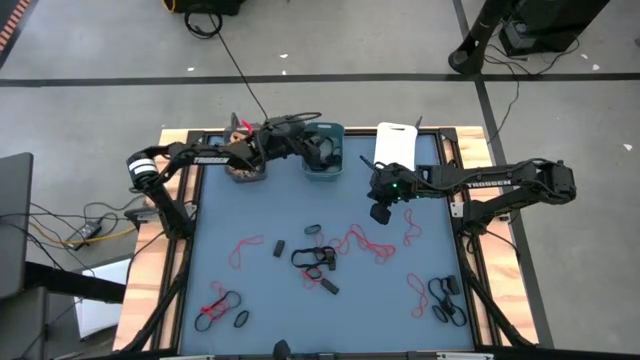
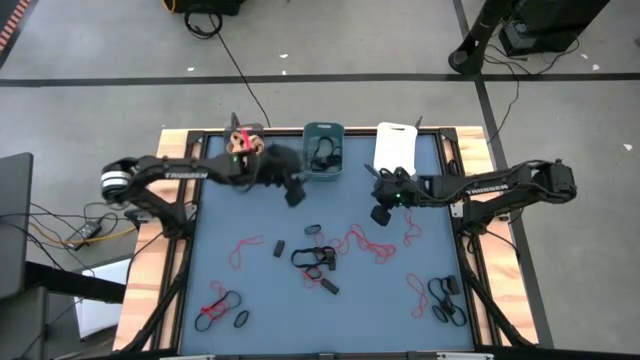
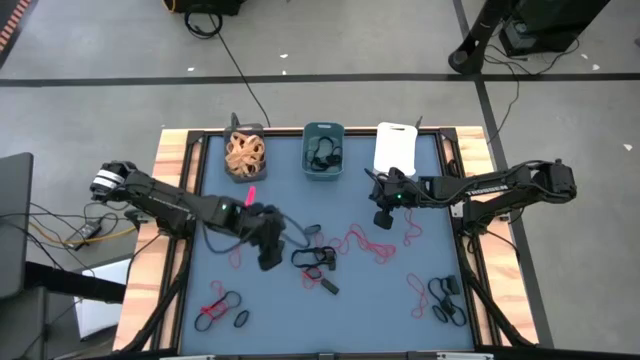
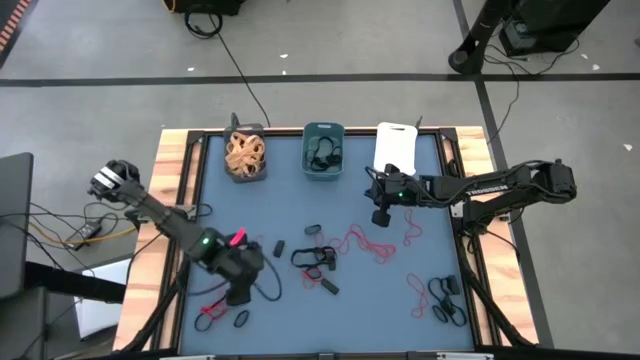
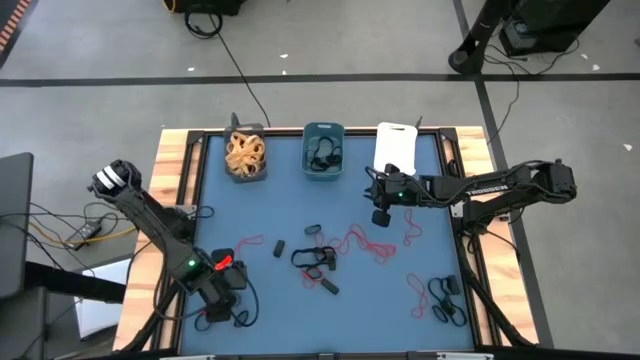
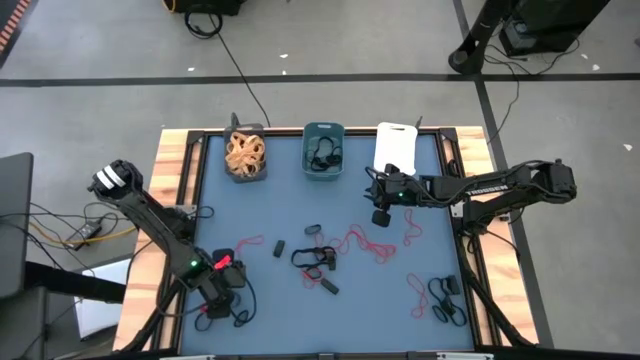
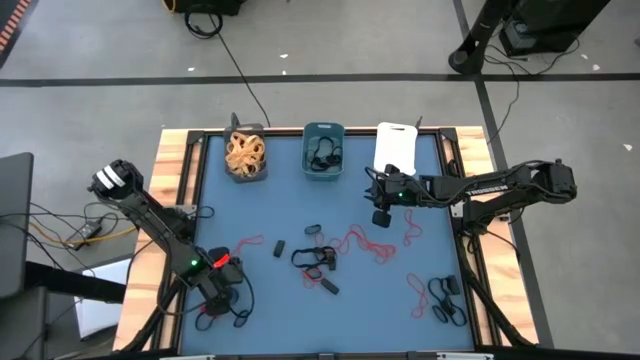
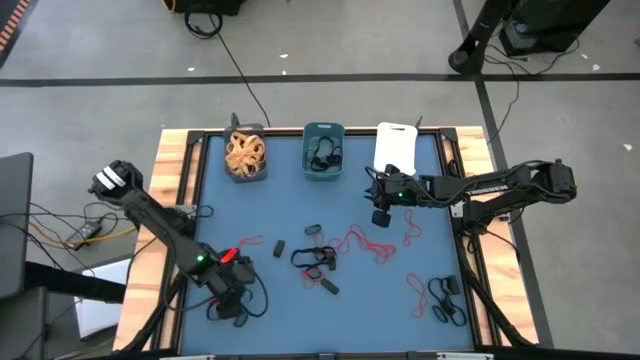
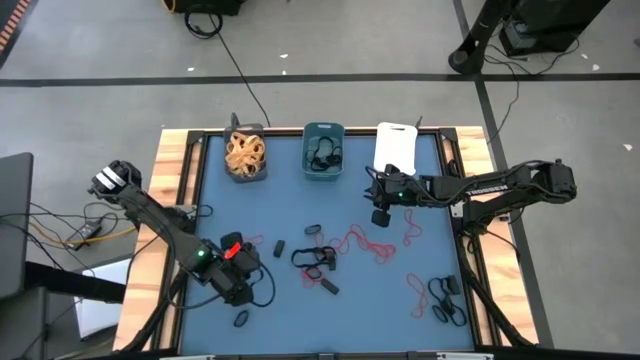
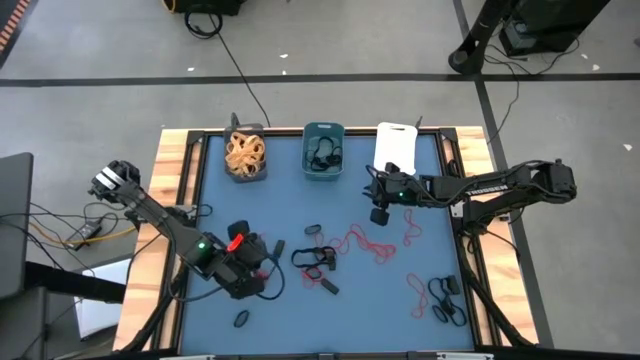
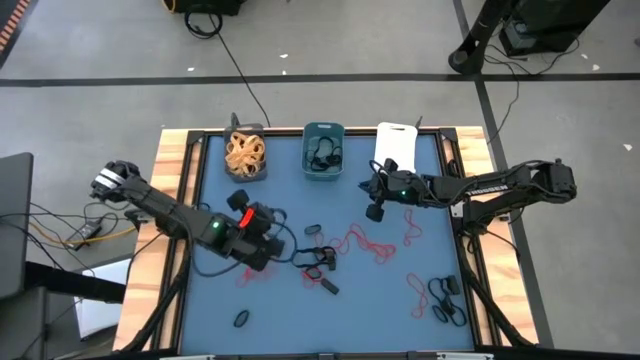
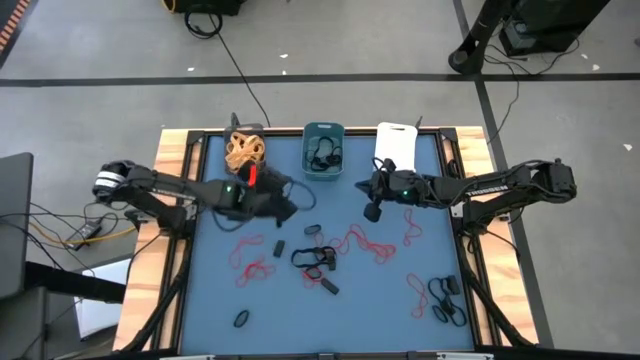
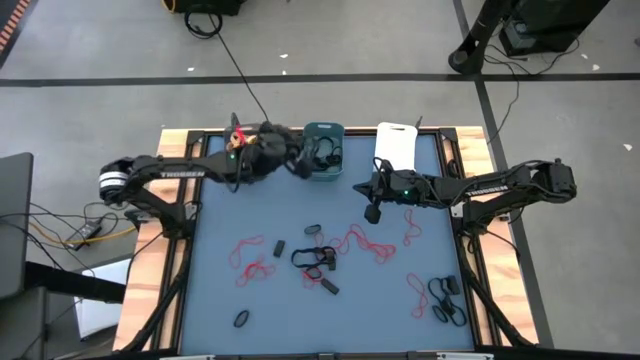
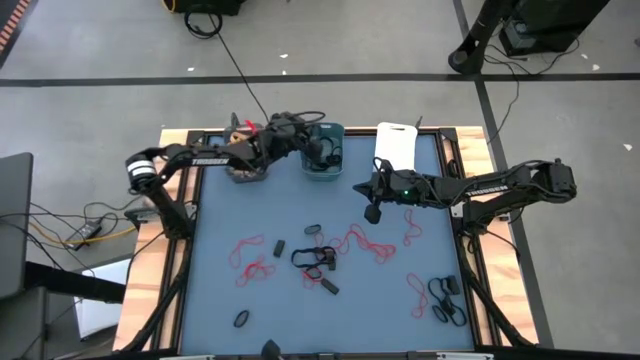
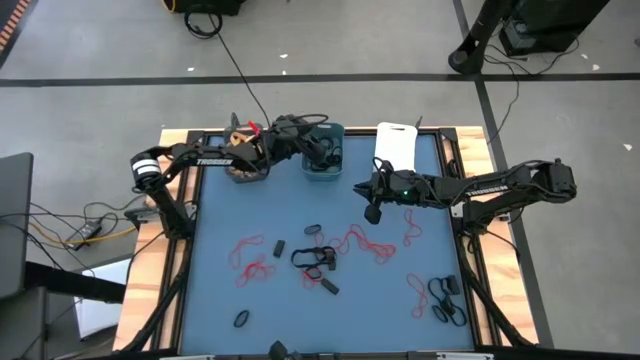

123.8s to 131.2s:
Task: Sort rubber bands into baskets
Put the black rubber band into the blue bin

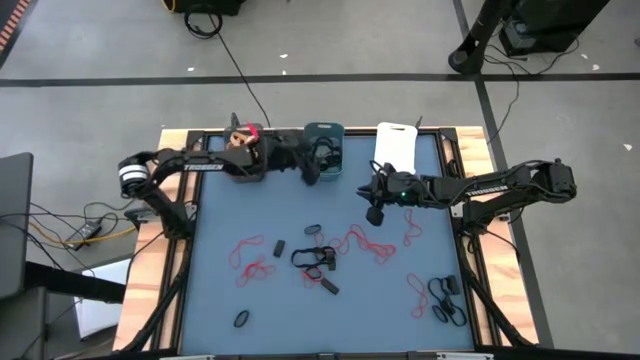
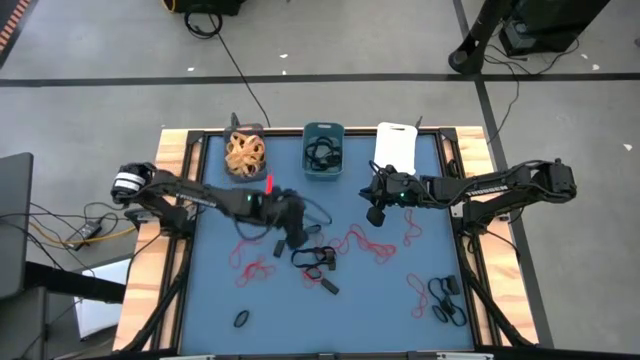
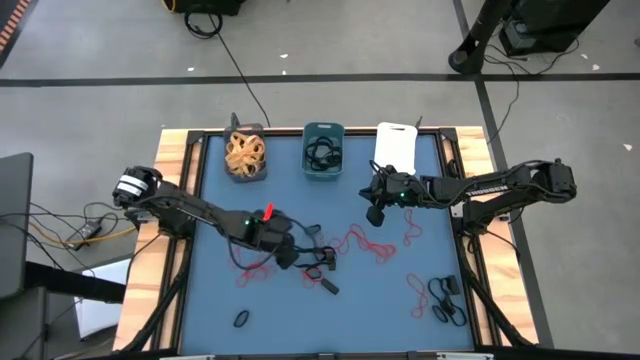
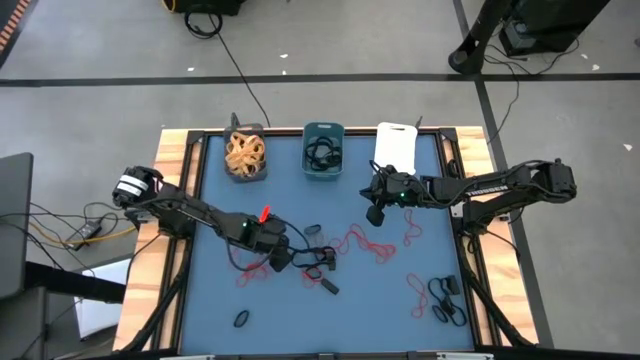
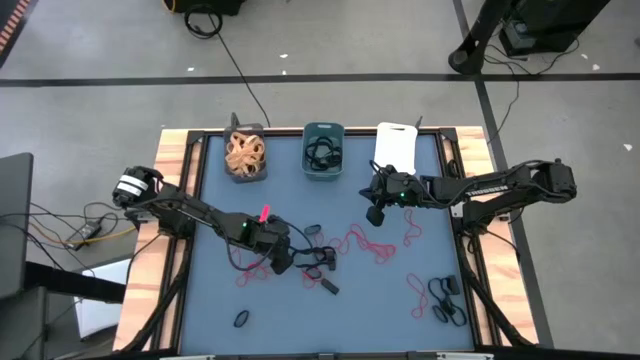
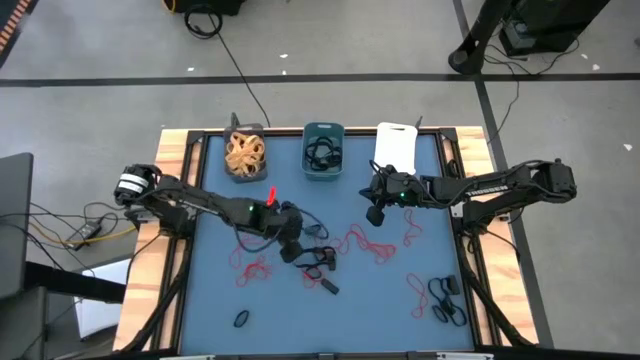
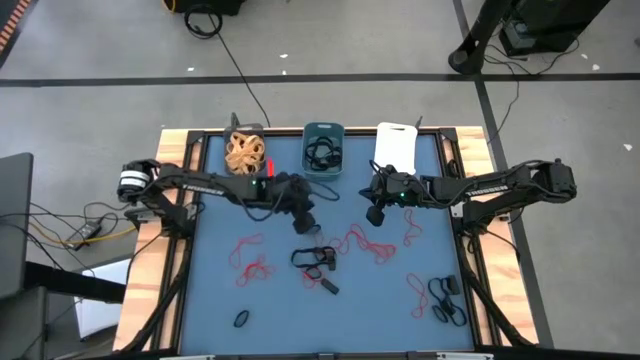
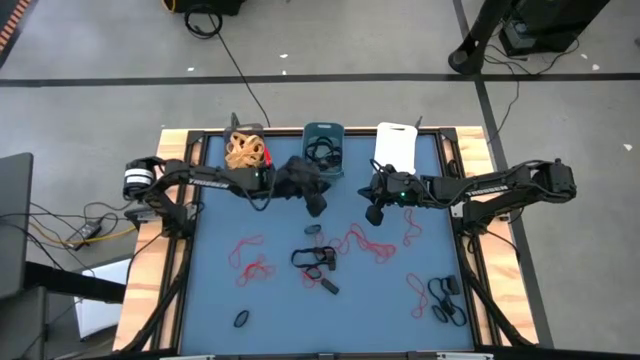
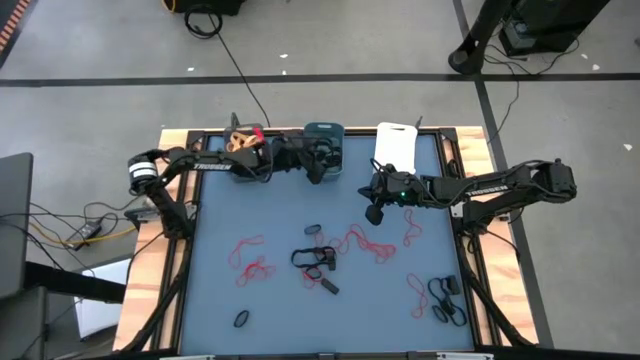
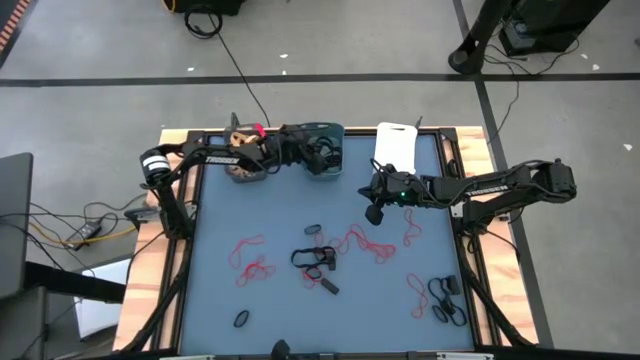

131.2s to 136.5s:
Put the black rubber band into the blue bin

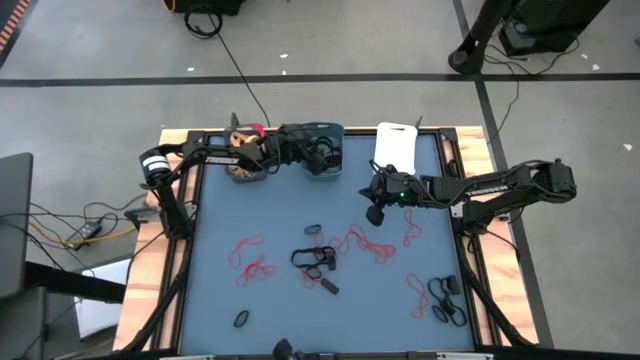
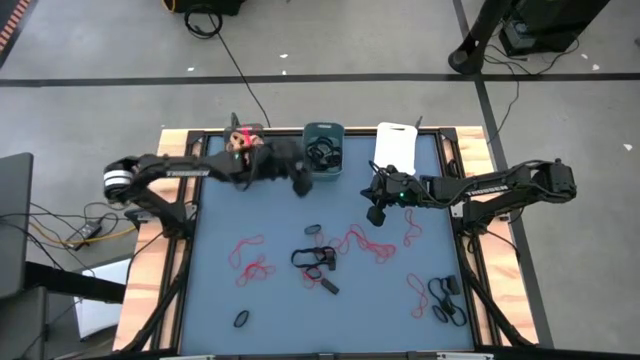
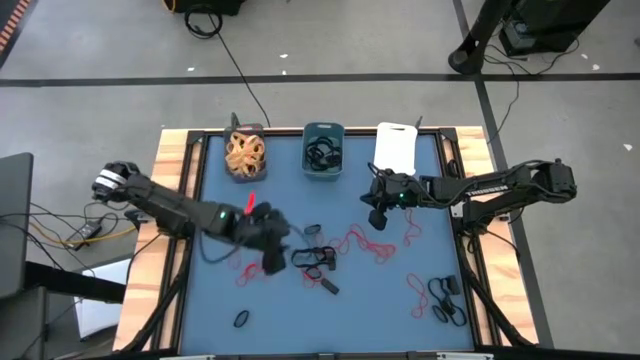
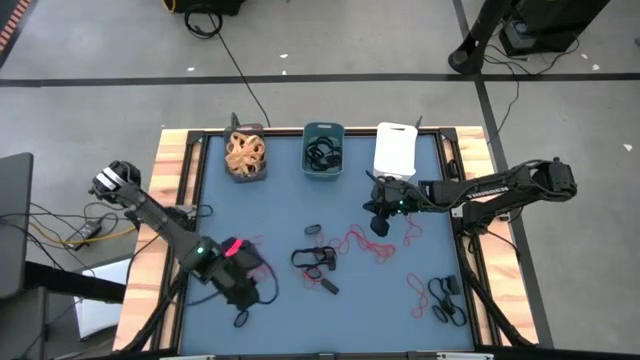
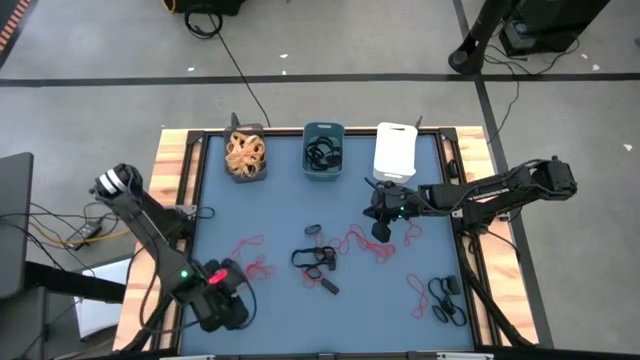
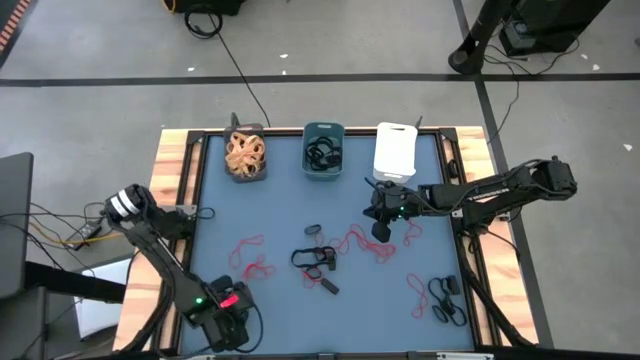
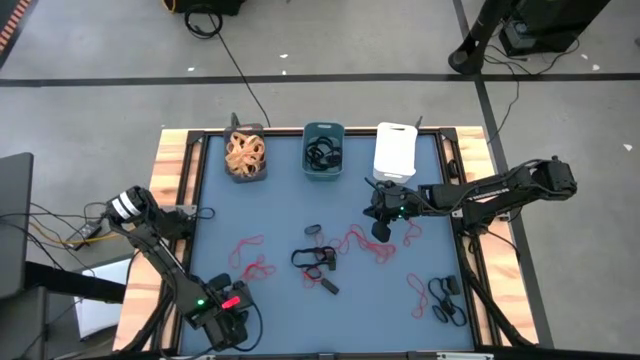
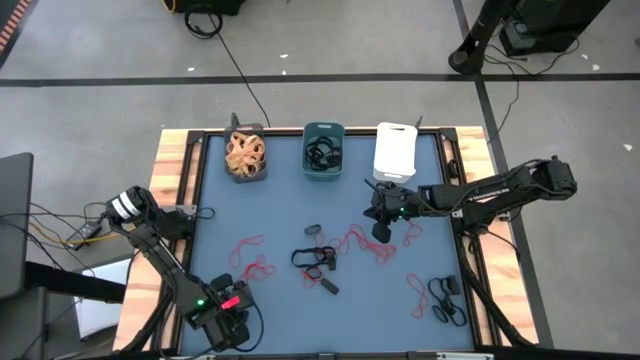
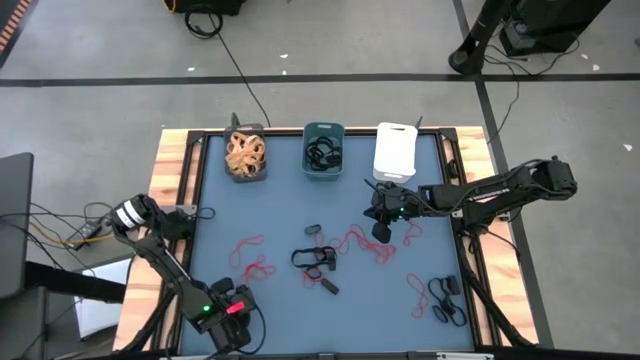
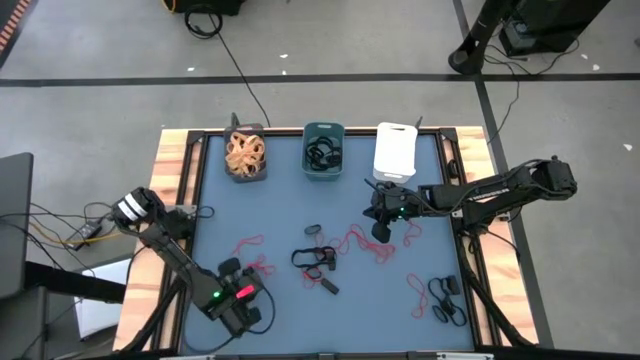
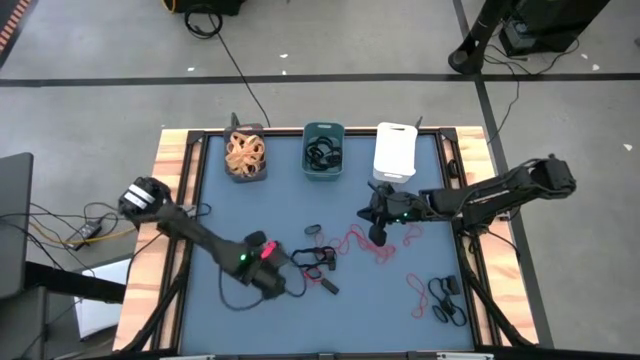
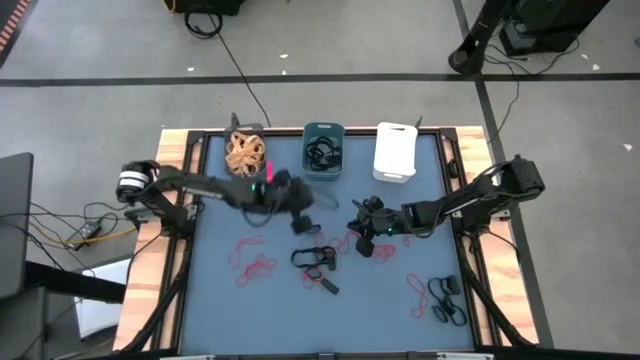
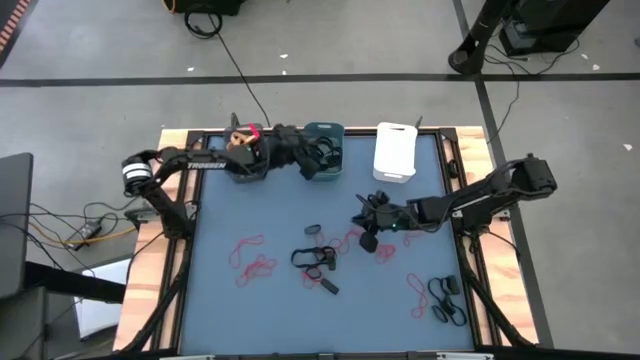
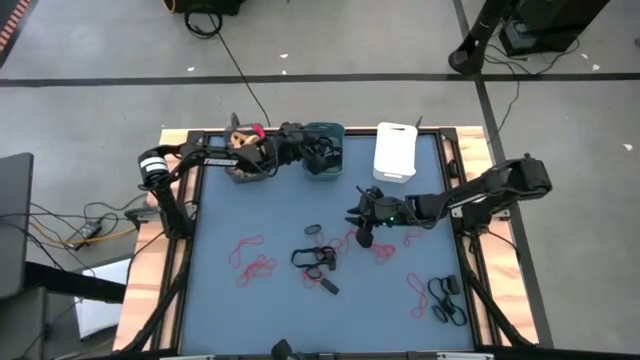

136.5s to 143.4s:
Put the black rubber band into the blue bin

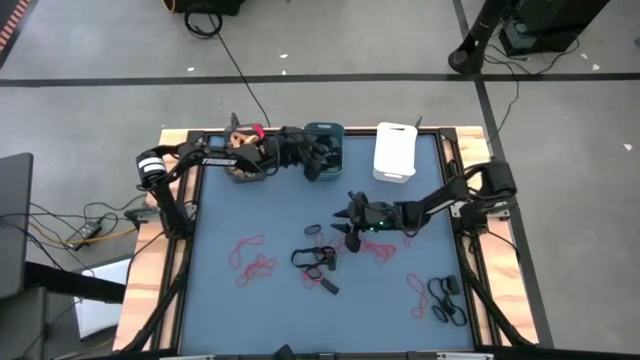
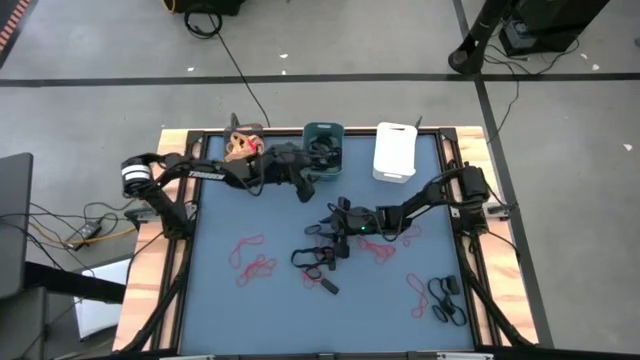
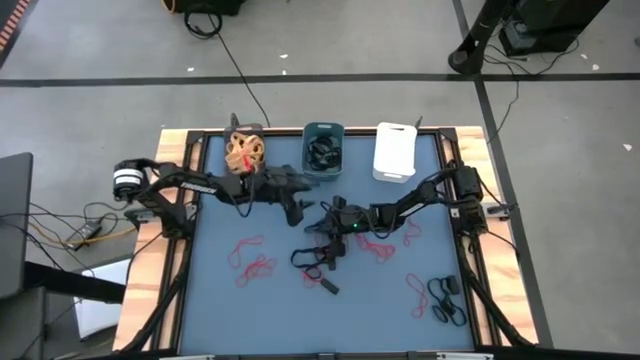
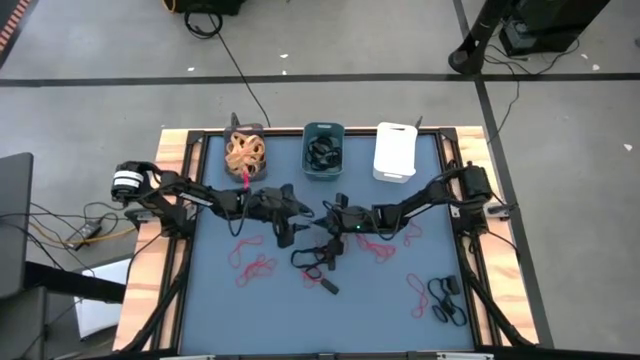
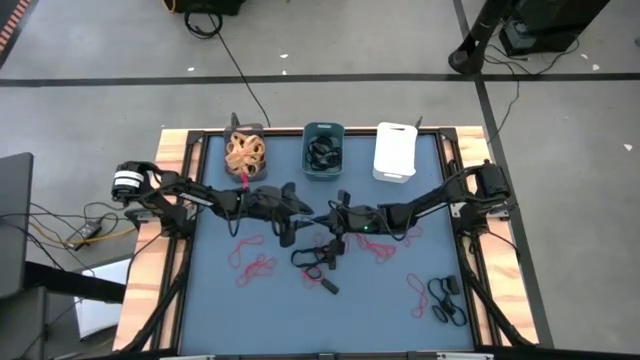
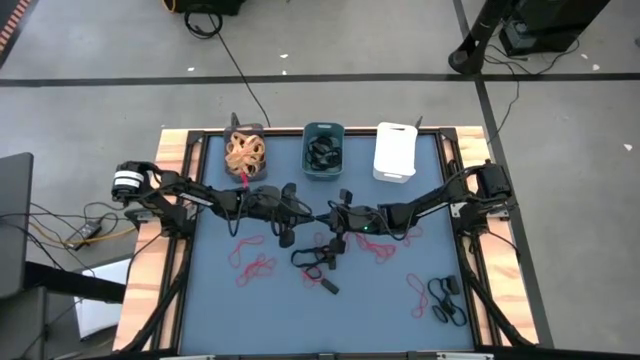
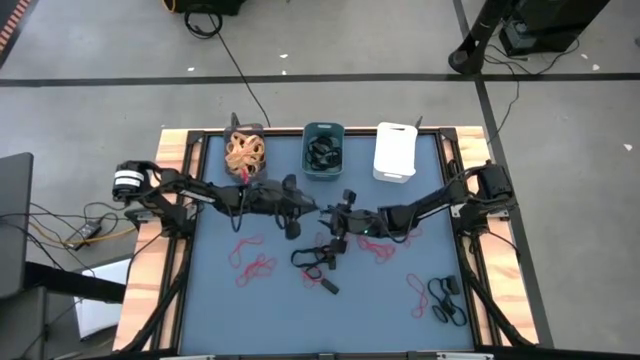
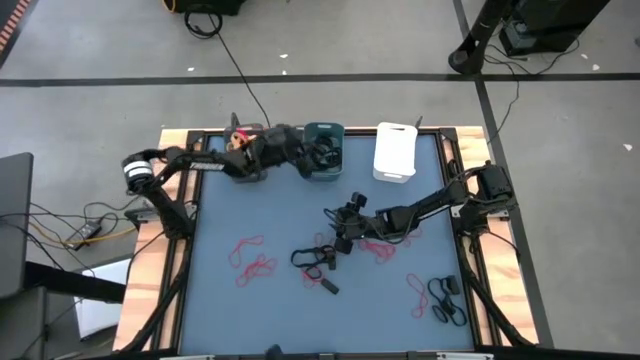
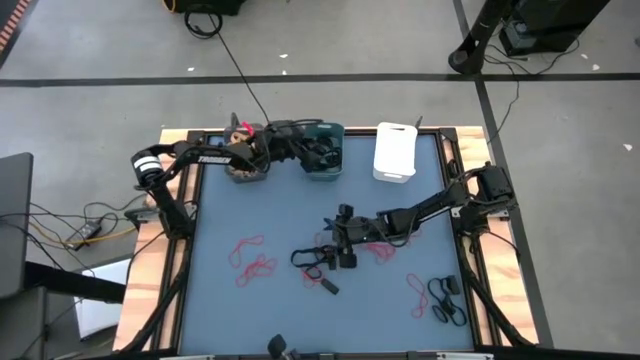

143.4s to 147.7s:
Put the black rubber band into the blue bin
